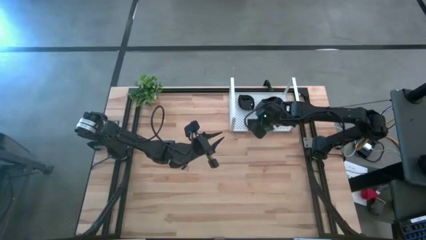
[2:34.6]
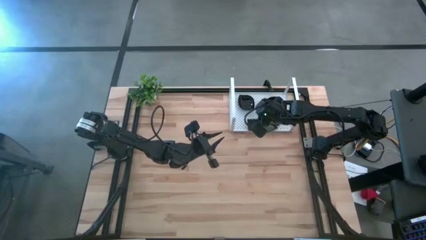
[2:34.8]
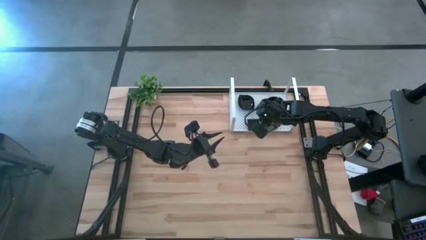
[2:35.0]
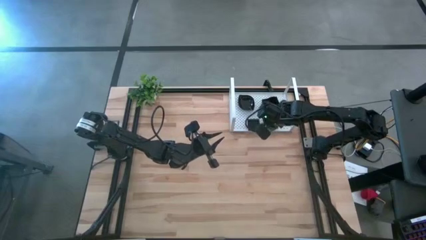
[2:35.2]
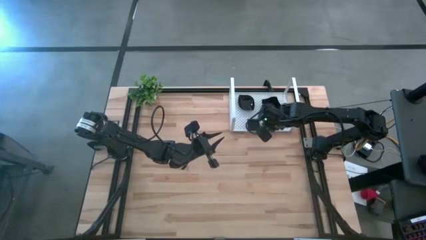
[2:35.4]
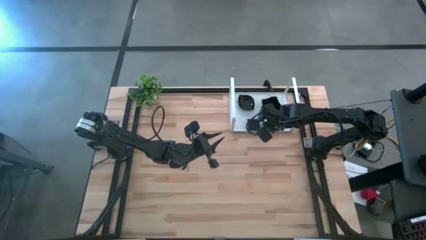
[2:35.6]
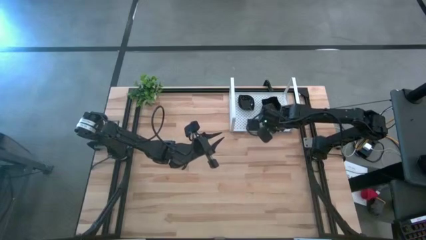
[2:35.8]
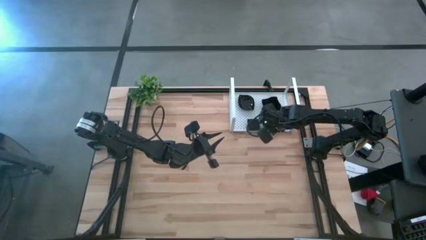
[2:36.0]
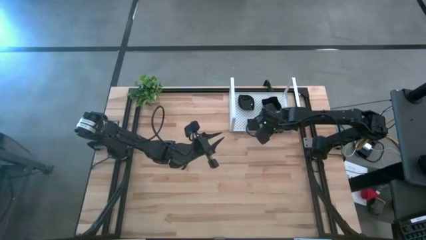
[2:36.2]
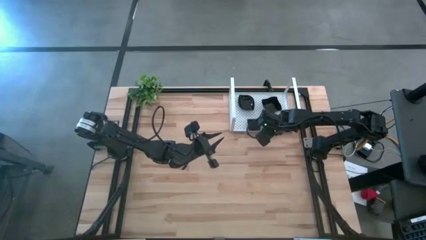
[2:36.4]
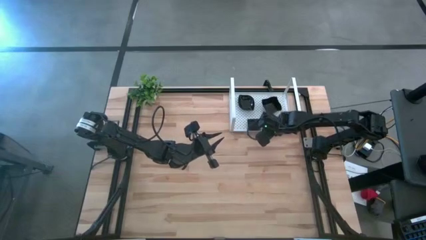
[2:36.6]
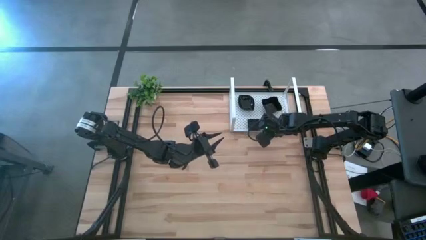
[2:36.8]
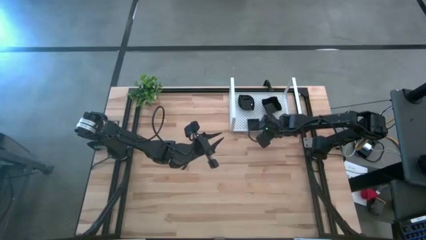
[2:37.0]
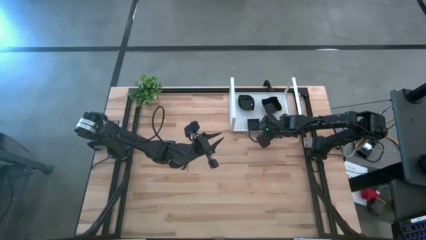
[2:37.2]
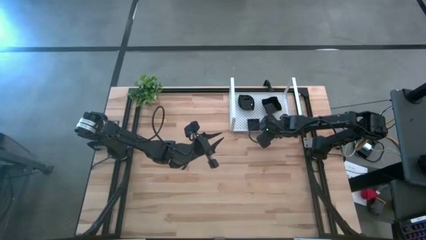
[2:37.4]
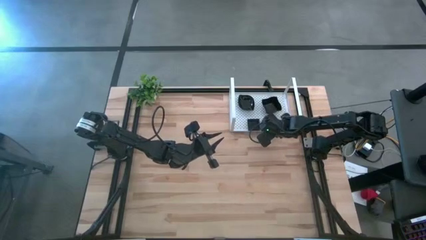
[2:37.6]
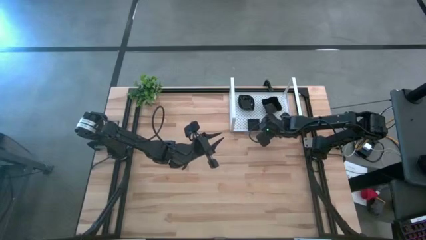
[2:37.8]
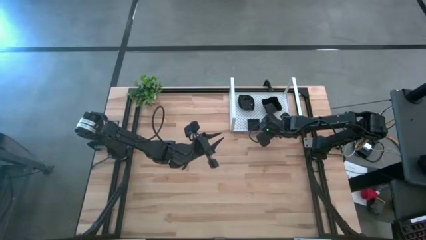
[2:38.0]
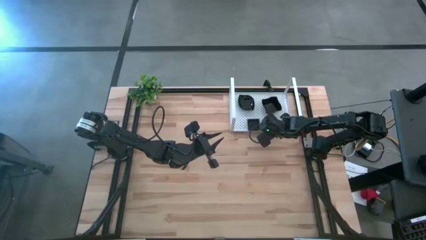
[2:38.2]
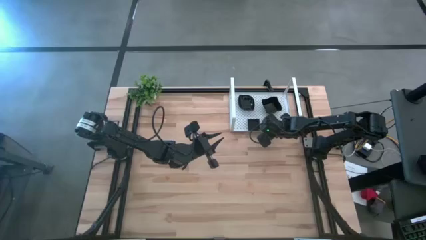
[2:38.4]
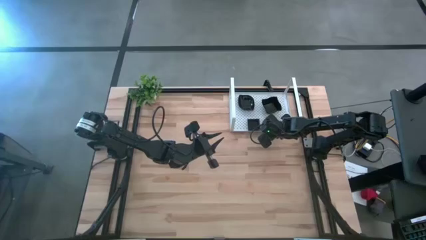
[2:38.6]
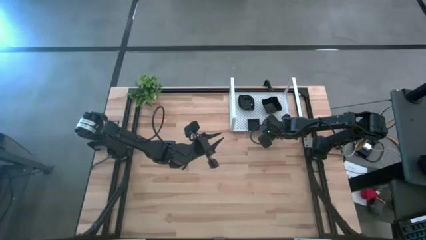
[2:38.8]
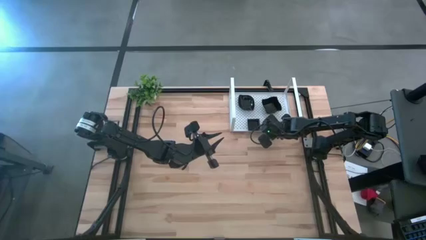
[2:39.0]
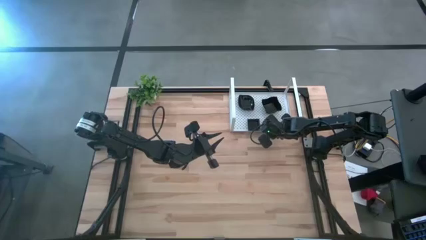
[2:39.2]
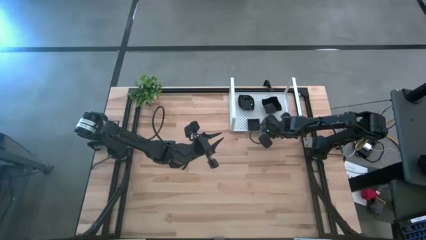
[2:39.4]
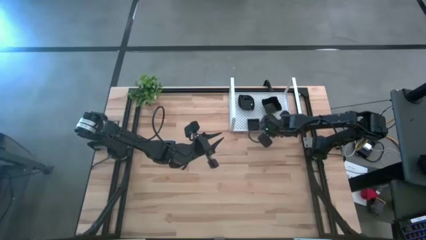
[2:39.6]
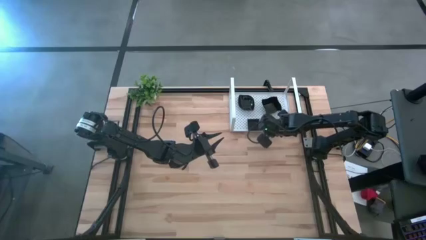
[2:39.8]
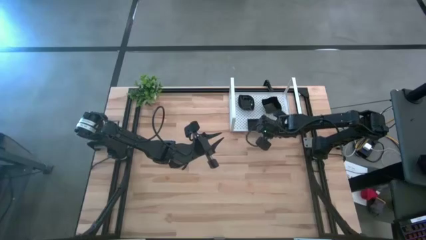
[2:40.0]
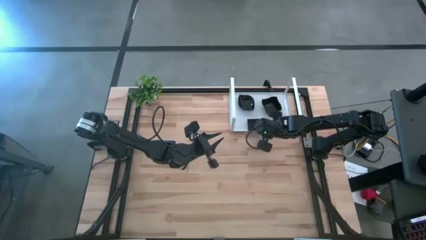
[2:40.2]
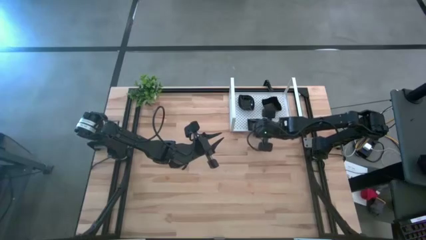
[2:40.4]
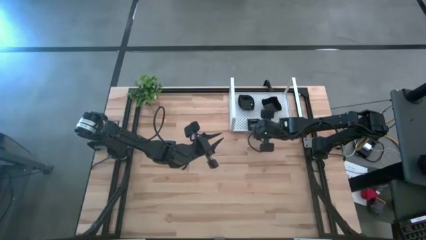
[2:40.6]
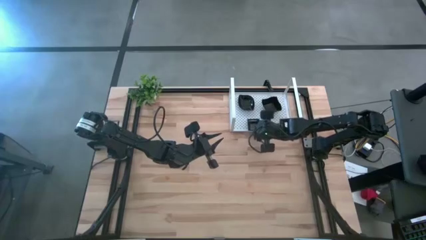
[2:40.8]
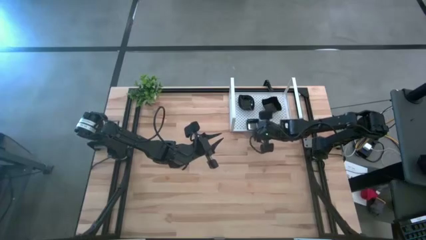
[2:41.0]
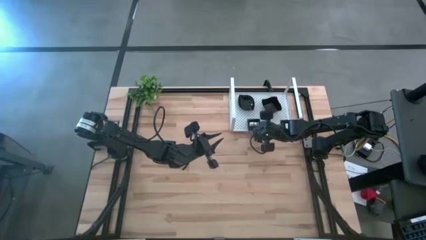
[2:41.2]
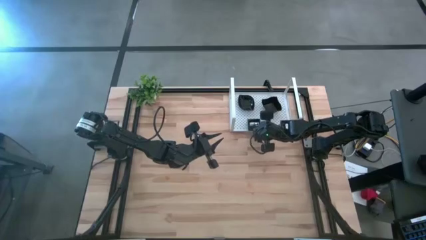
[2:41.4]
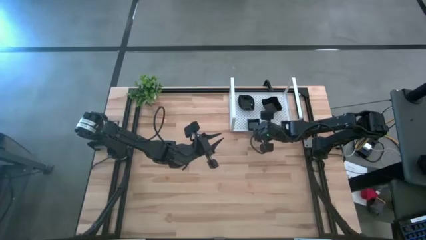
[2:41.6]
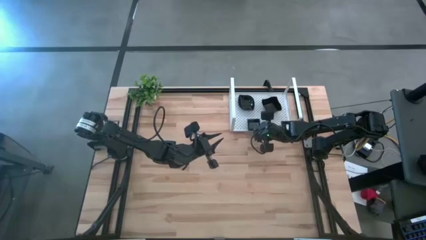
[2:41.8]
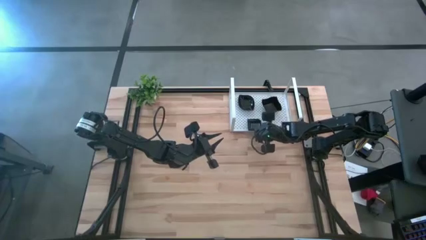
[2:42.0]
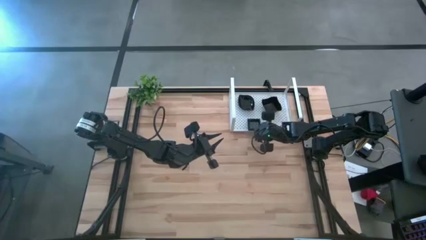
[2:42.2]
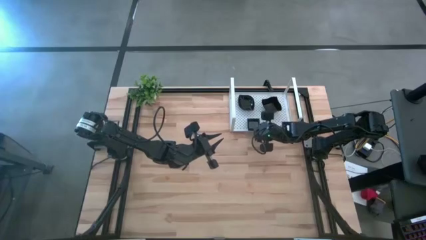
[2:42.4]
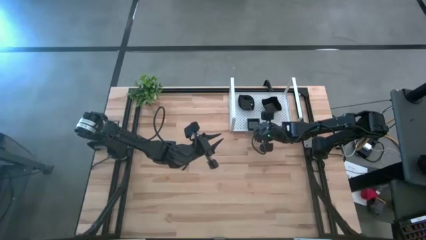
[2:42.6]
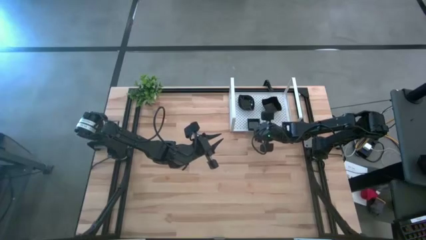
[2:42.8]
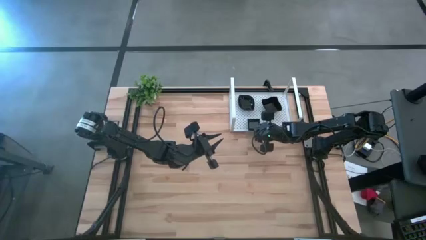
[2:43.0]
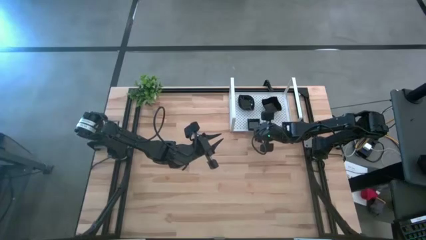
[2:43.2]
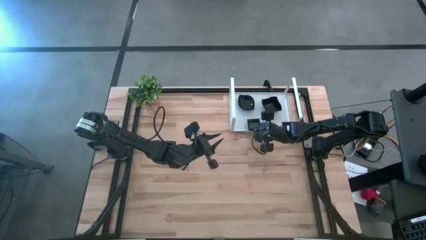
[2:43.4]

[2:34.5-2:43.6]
Task: Pick & Place Mini shaped plates
Stack the square plate on top of the other square plates on the shelf

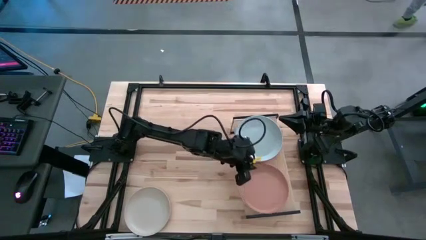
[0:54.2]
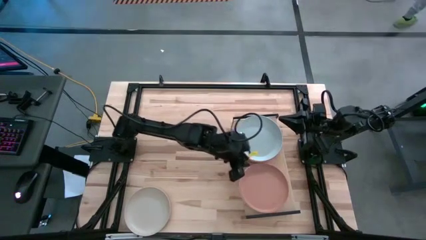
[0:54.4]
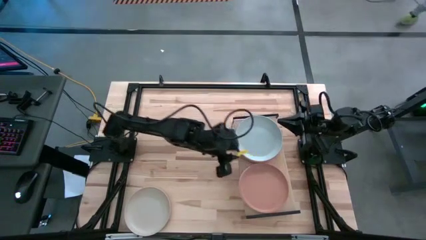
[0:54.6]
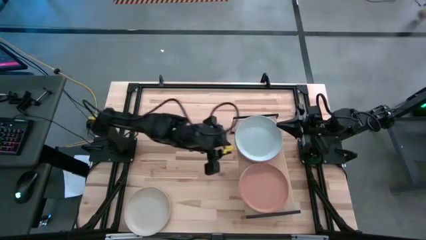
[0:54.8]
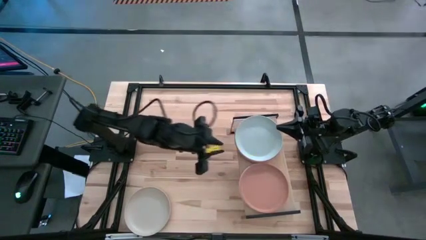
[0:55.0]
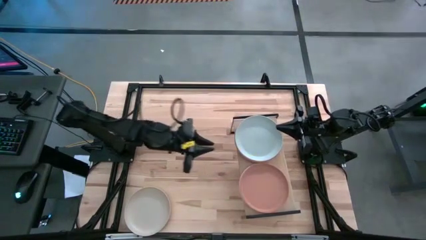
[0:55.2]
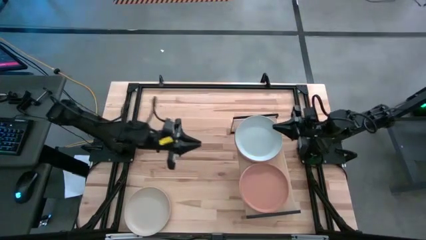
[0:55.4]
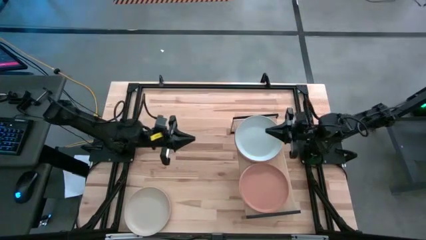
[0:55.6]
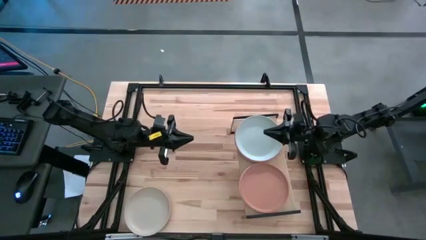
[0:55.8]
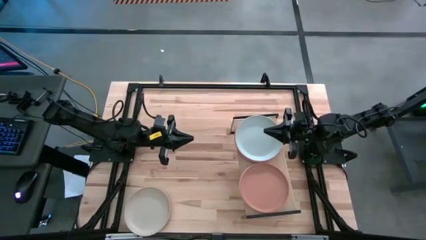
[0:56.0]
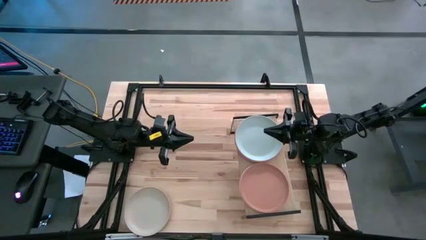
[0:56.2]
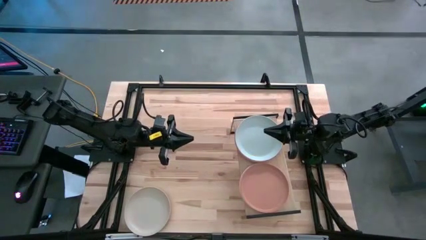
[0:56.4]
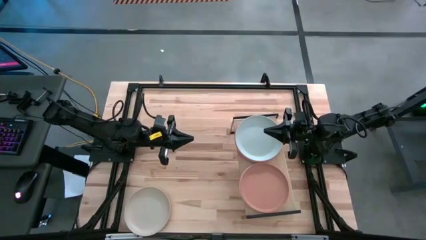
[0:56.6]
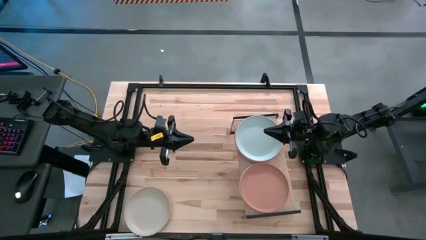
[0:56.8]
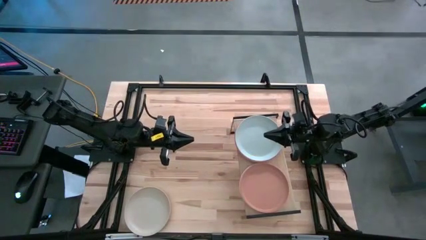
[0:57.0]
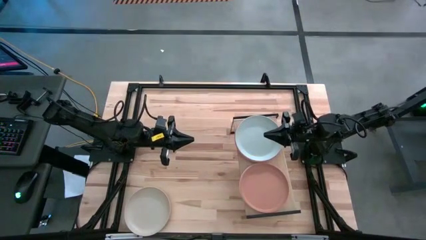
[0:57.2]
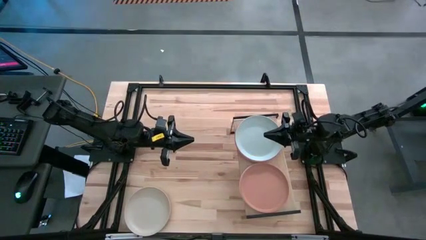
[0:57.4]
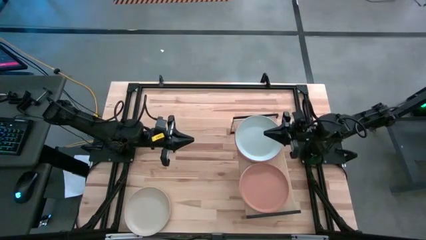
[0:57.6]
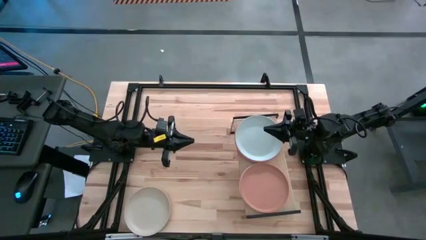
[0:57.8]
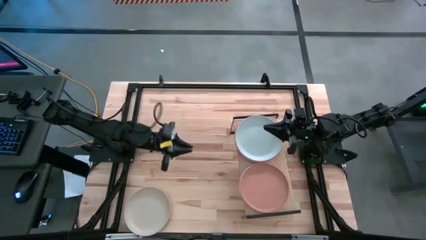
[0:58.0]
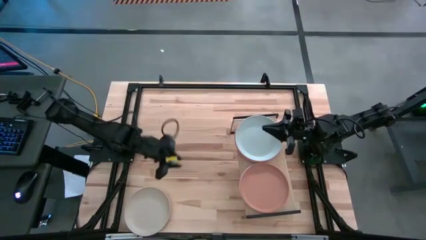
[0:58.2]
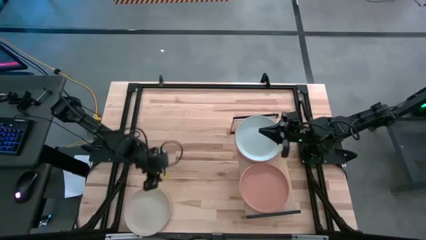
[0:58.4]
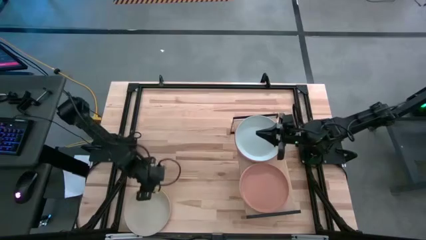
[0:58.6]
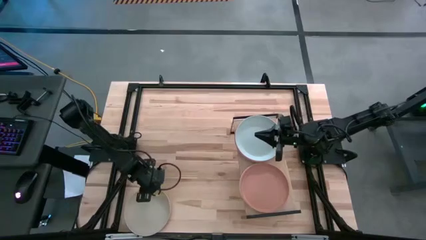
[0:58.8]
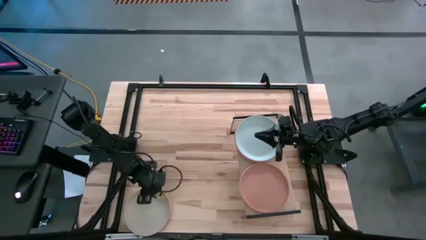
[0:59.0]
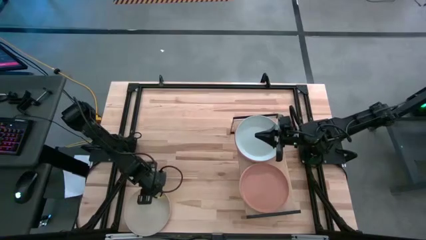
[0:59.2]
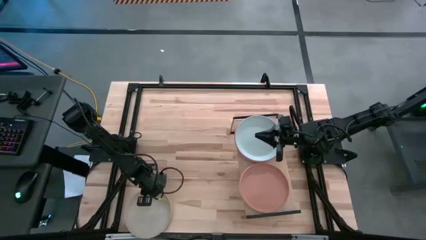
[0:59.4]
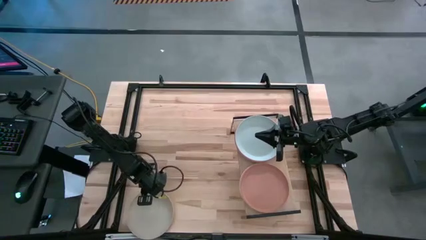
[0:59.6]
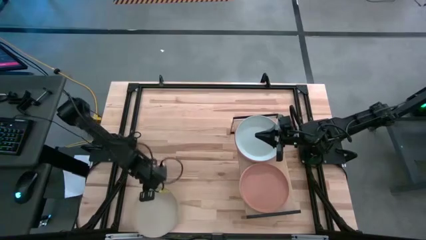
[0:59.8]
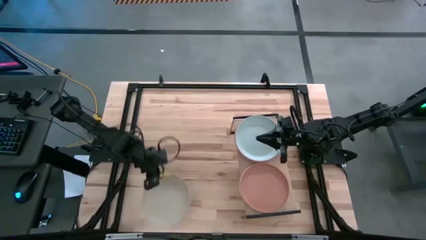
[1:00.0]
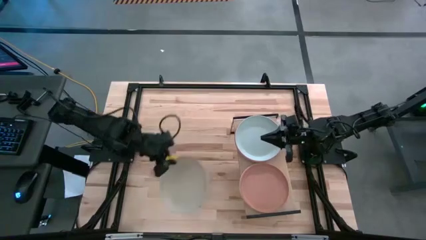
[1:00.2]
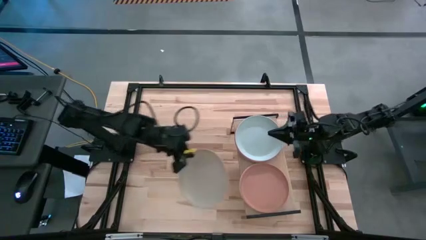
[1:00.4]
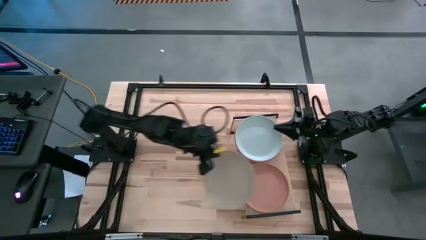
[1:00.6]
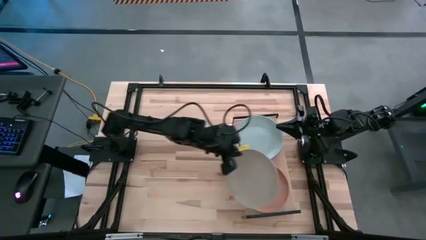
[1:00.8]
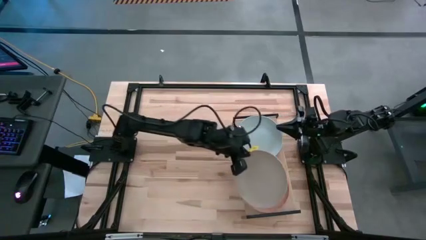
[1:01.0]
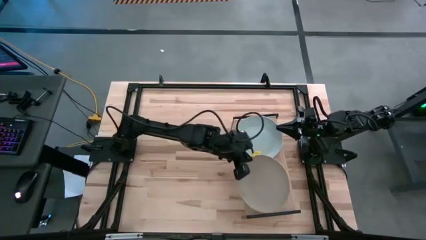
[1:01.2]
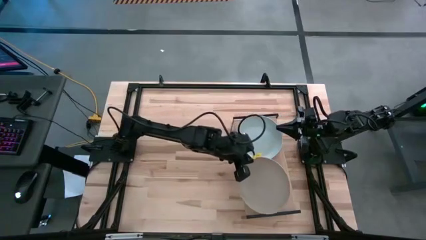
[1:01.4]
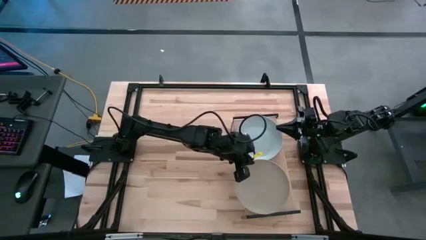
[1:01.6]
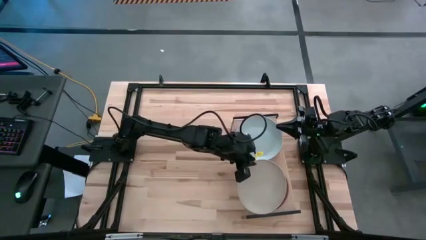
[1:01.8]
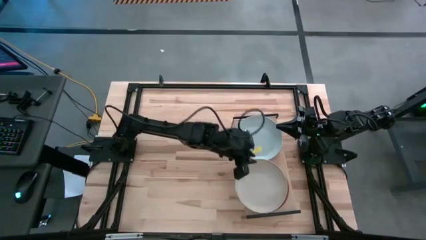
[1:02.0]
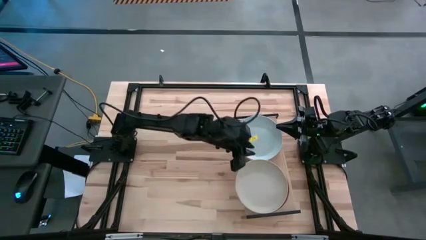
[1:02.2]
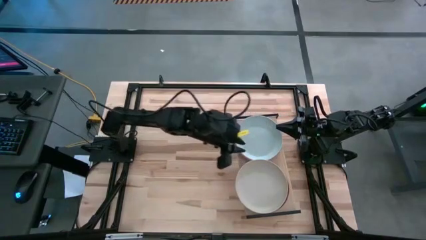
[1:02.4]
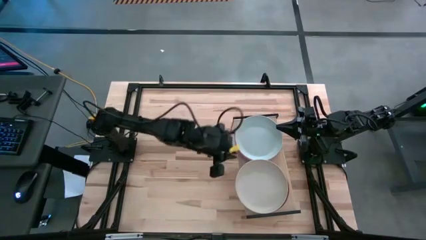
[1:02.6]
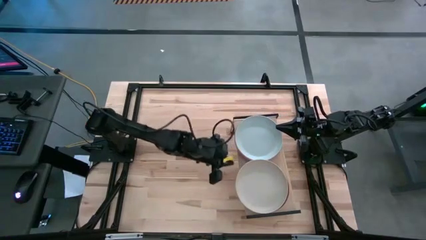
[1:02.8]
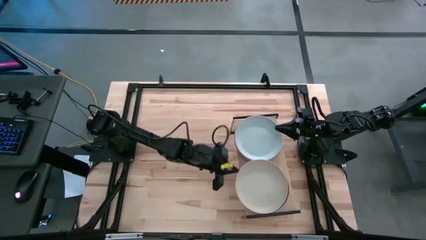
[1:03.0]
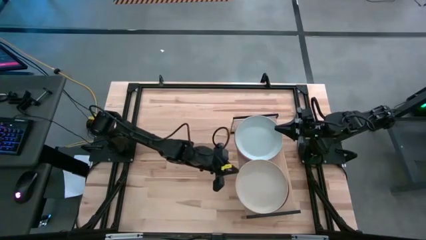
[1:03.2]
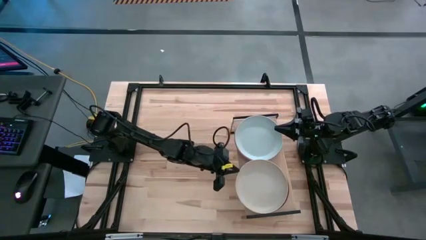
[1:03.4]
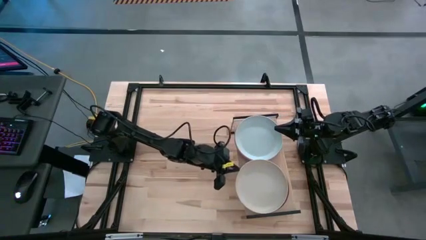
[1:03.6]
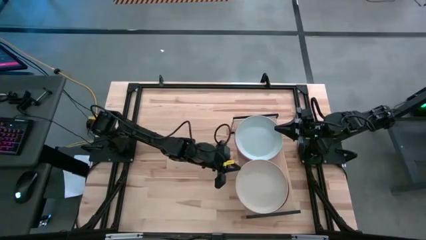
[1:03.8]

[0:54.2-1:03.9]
Task: Place and stack plates onto a shelf
Stack the gray plate on top of the brown plate on the shelf
